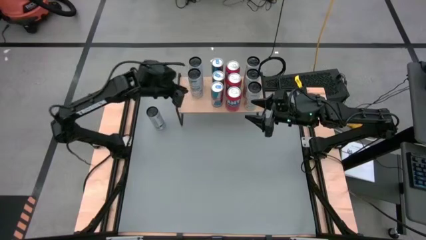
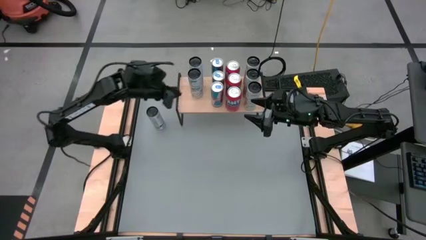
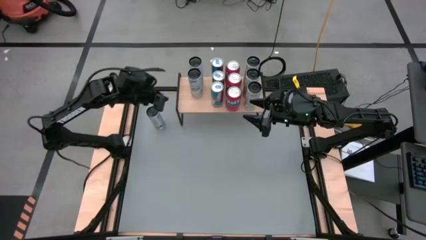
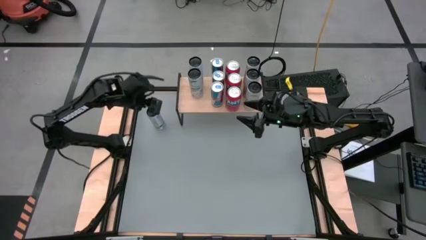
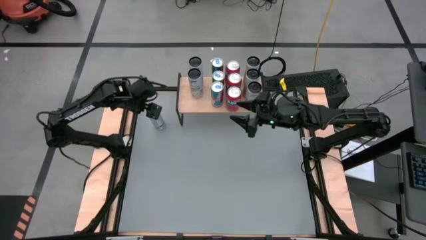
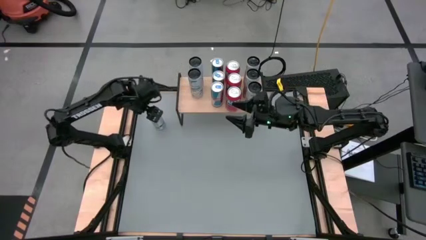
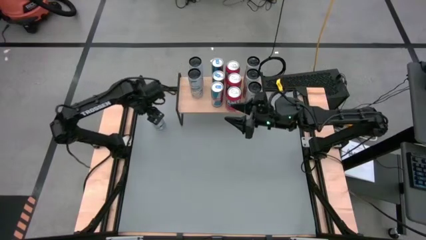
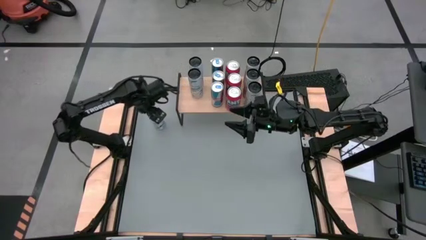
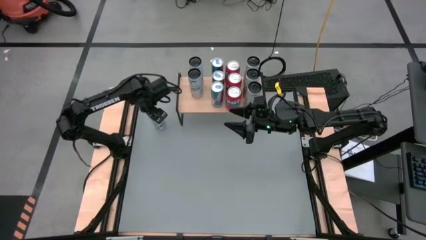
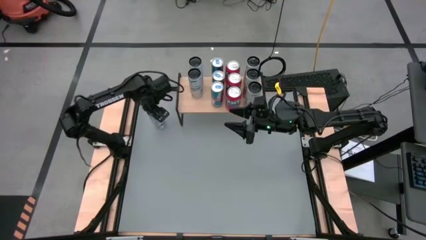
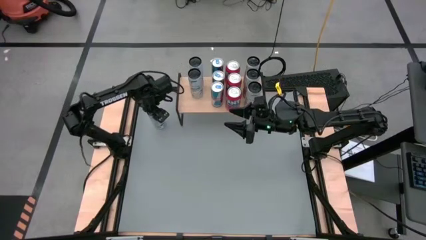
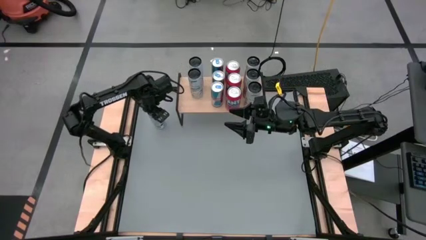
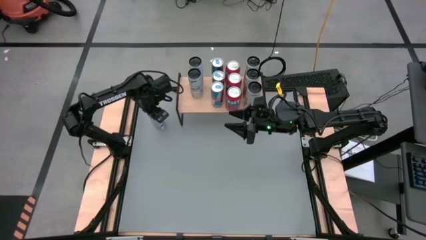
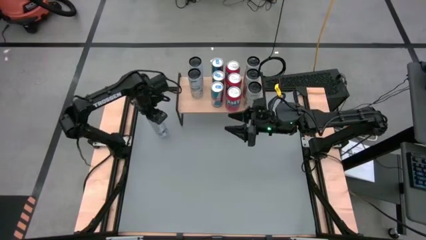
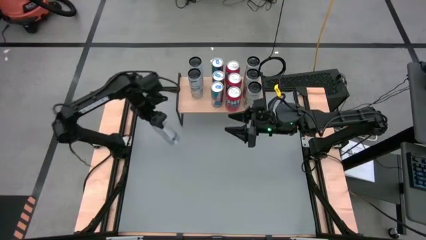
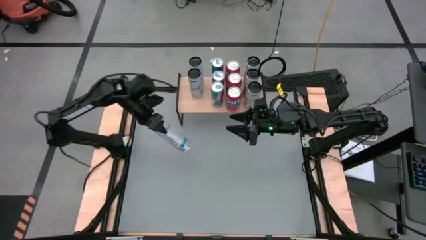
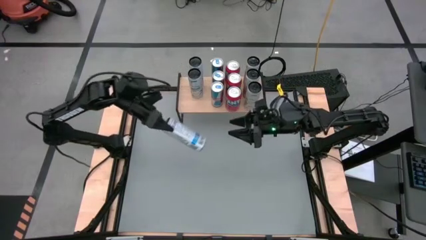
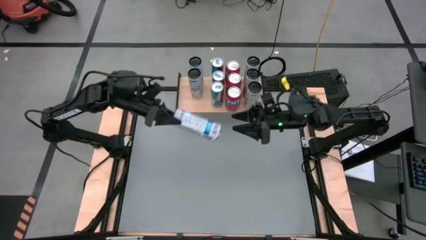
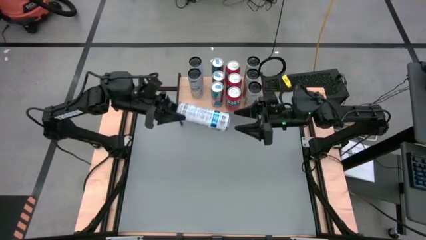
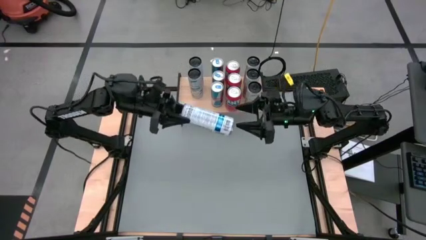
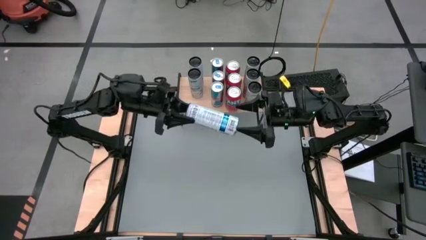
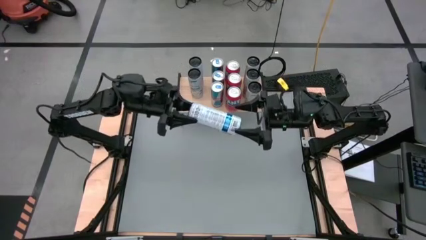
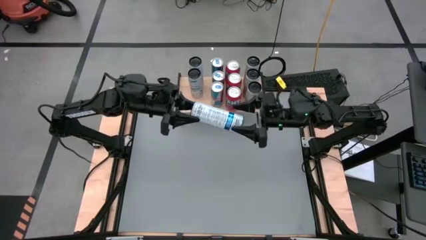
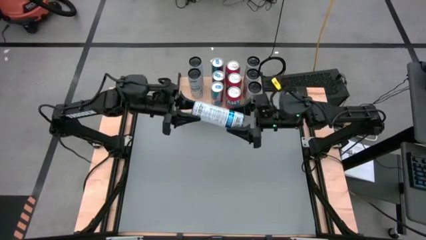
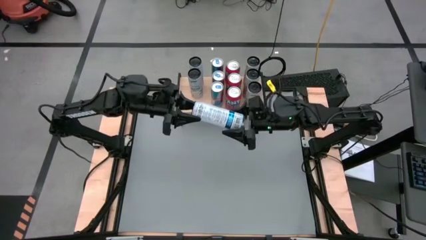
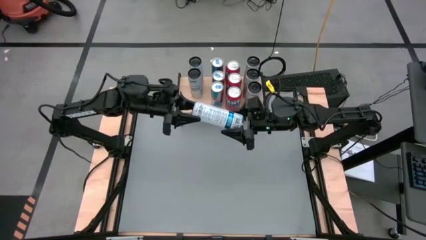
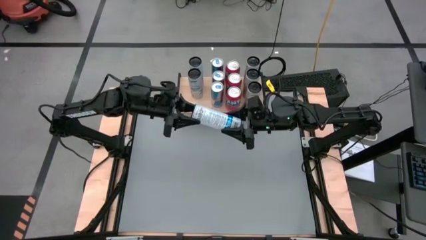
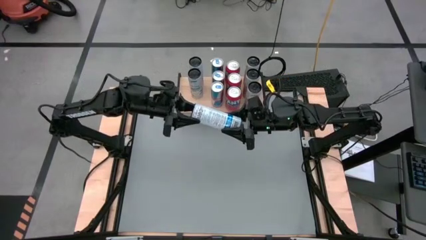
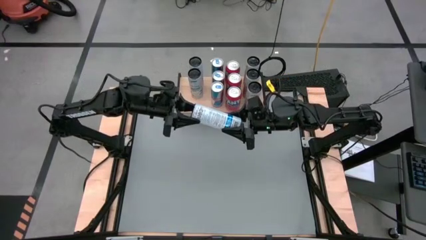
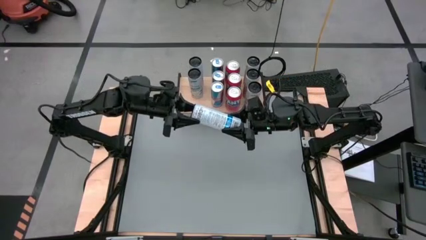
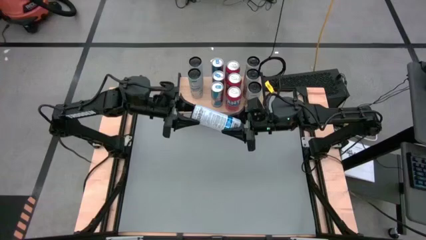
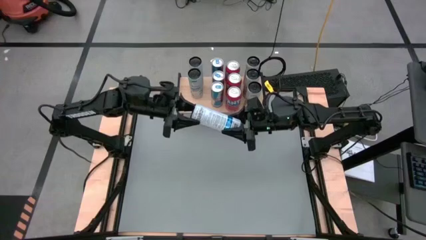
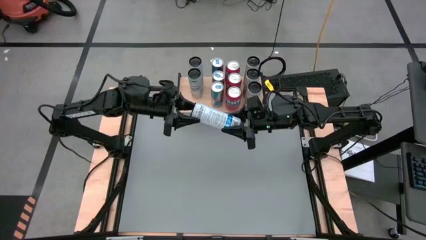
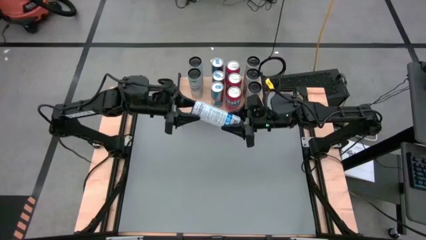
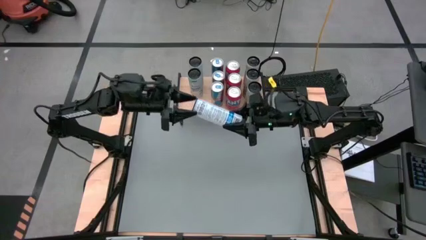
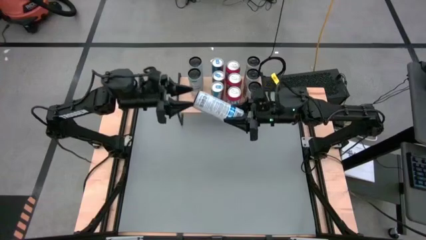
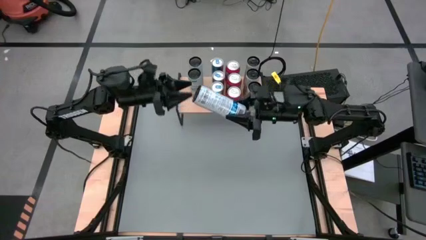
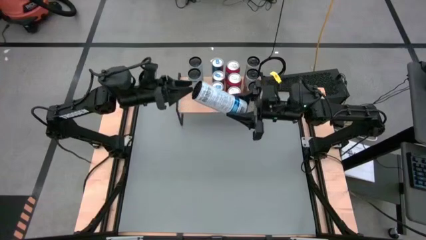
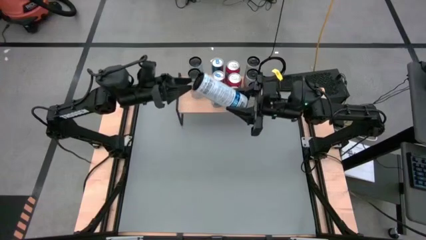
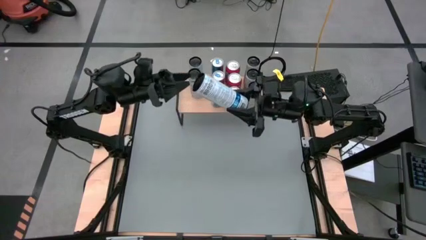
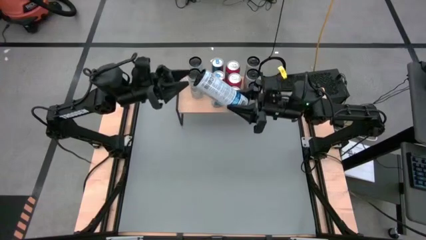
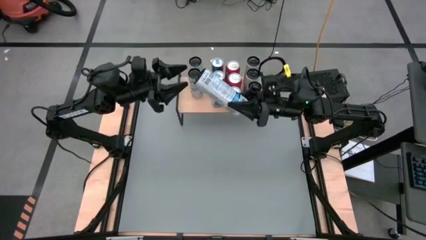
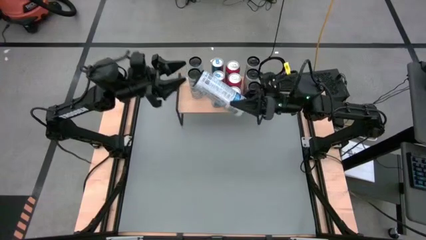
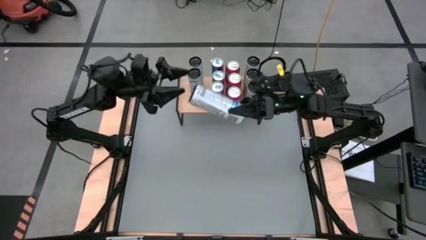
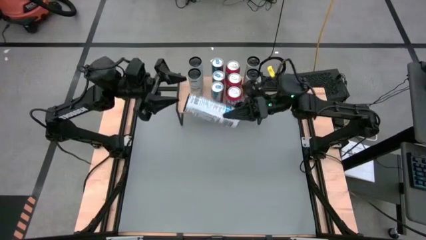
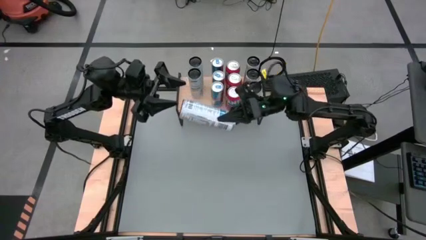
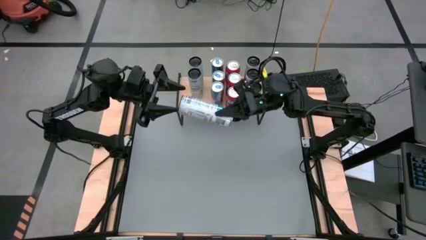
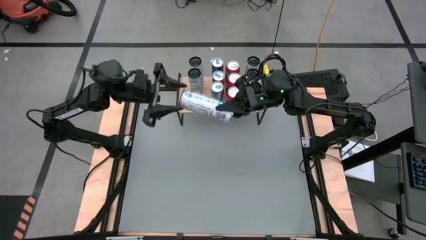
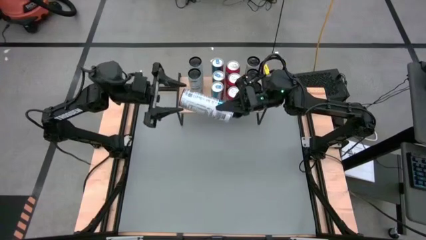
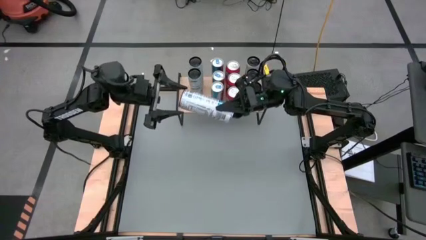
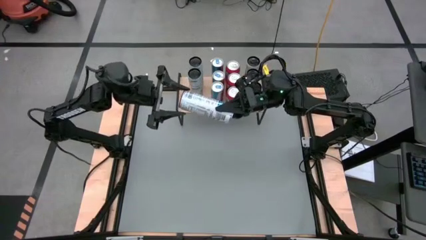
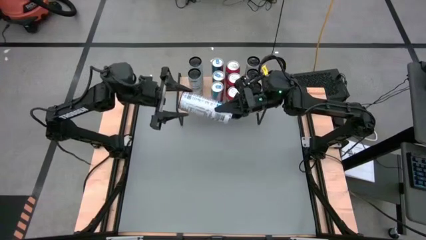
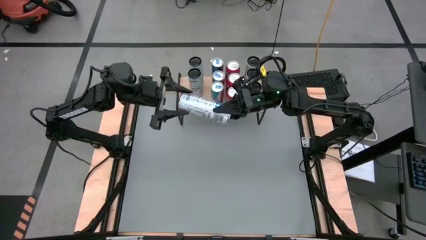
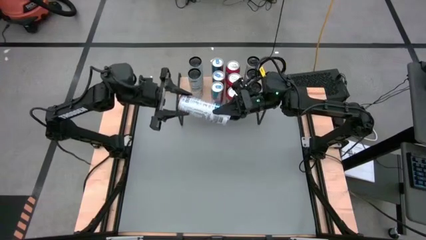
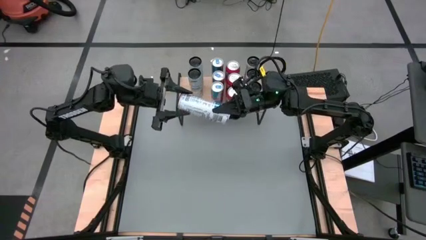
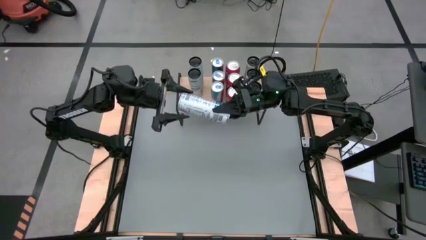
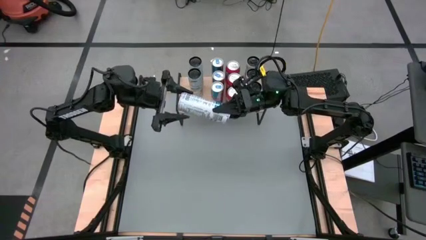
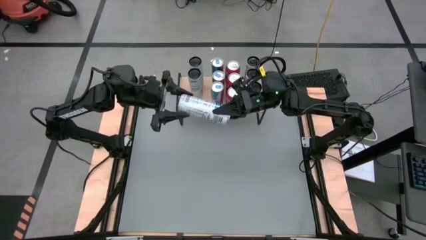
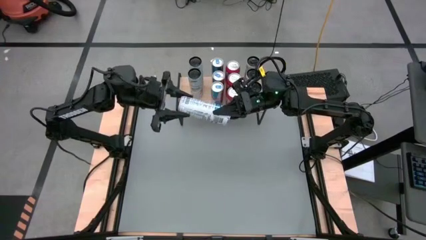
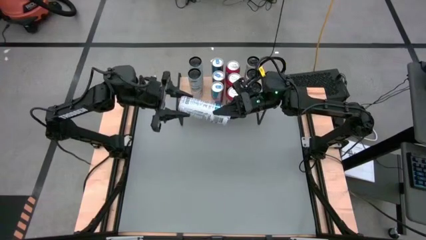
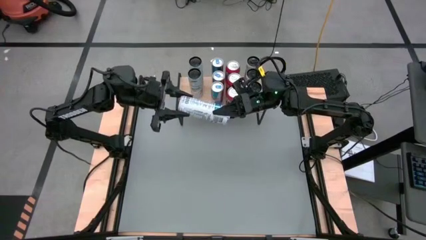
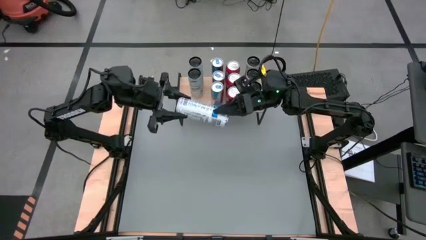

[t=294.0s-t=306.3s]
Task: Place canned beverage on shelf
Put the white soda can on the shelf aligned with the other white soda can

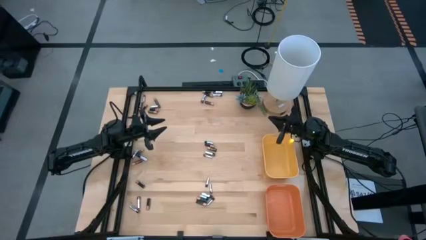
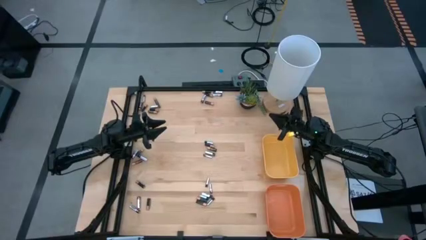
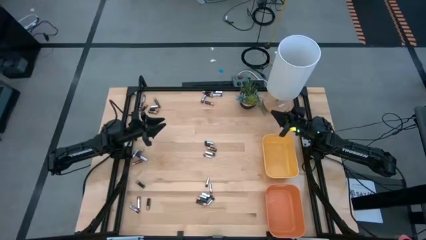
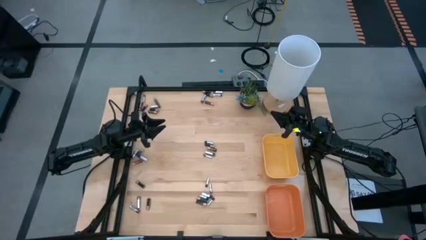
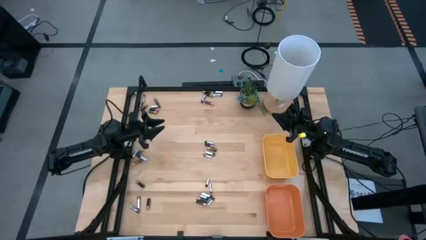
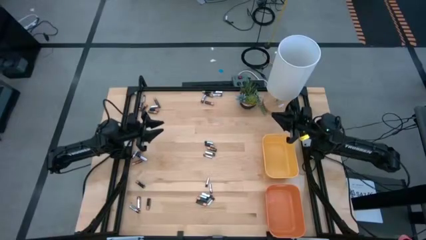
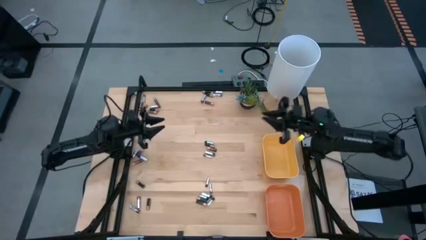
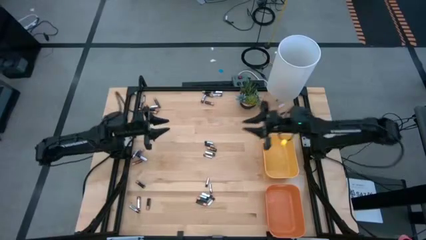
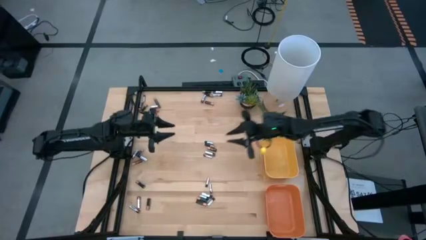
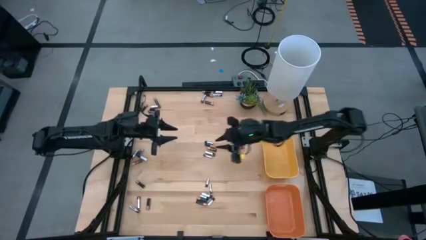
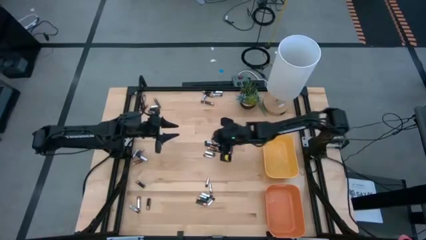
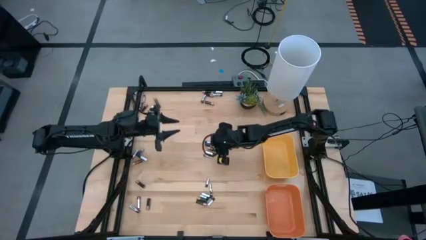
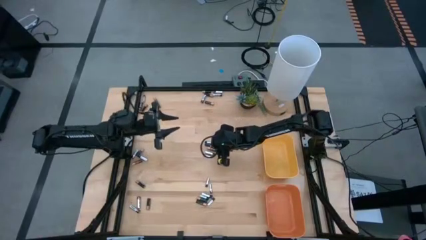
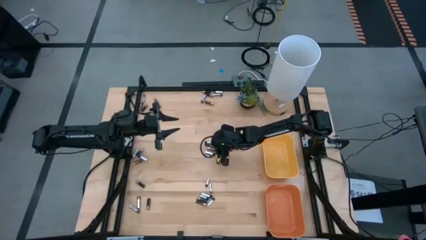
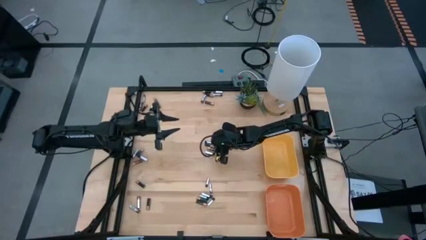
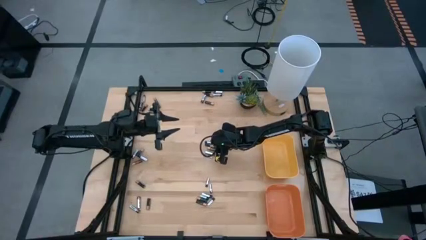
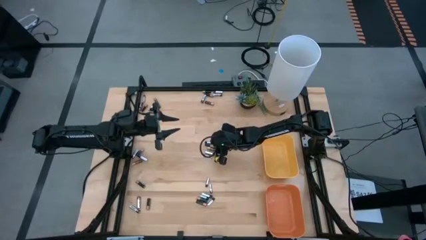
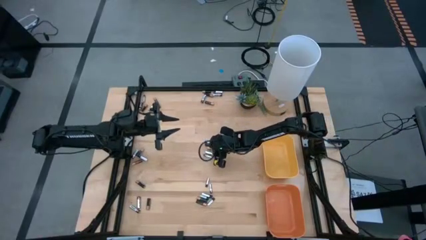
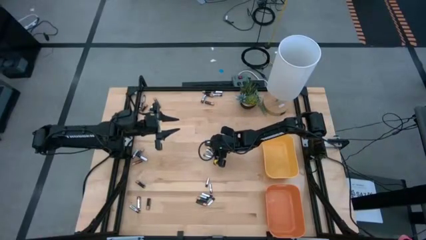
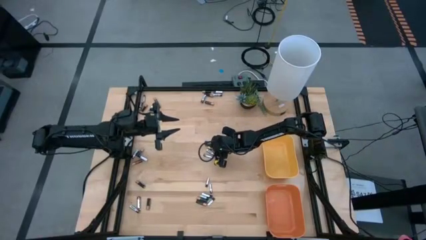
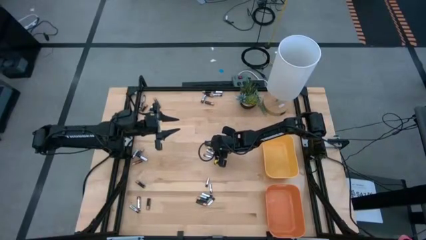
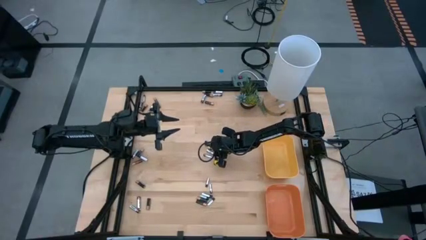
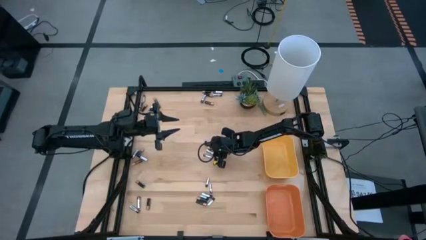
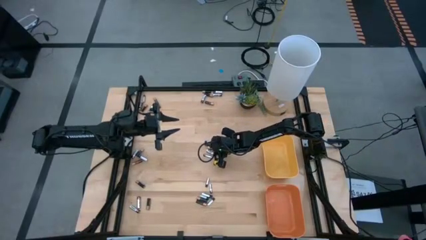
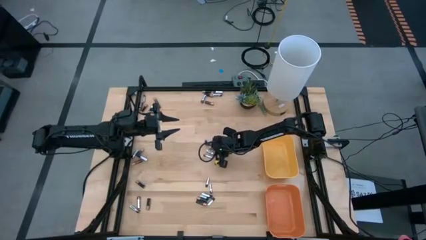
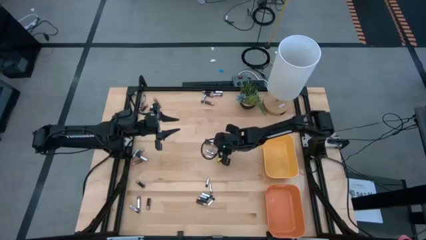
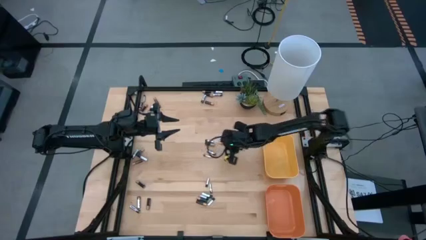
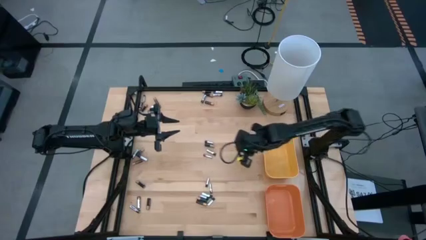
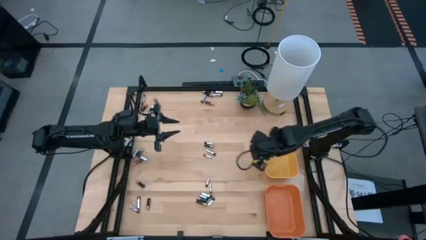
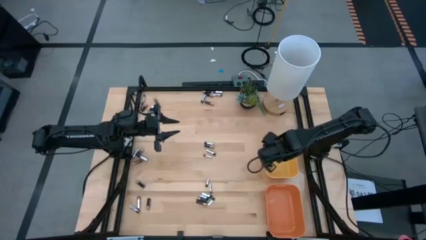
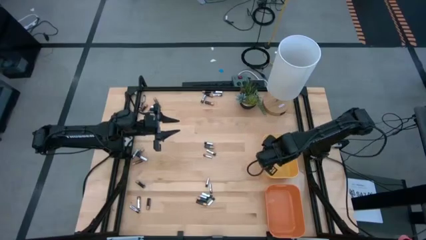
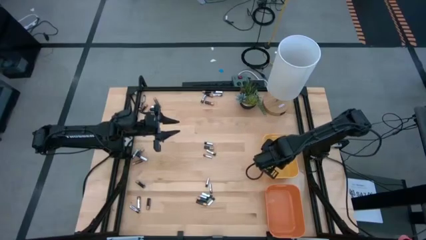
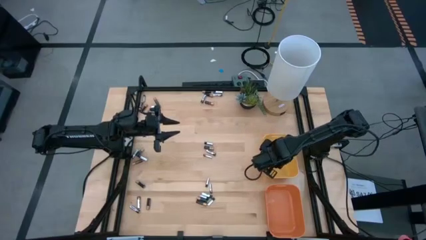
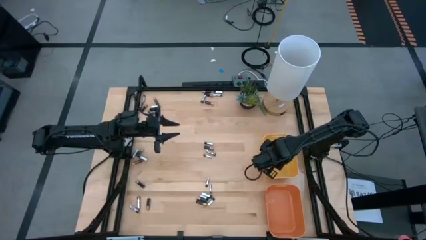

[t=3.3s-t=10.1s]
Task: Sort batteries
Put the brown battery into the yellow bin
